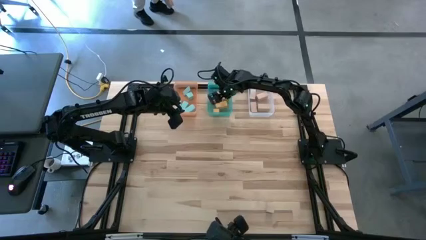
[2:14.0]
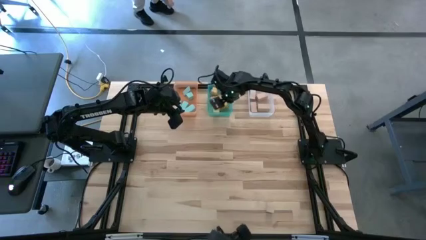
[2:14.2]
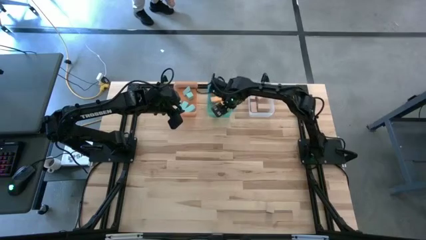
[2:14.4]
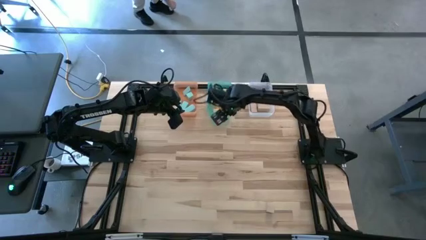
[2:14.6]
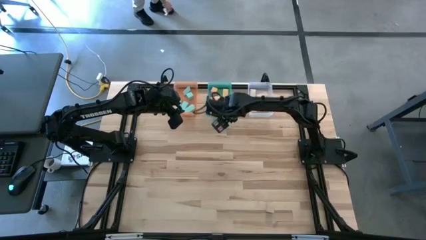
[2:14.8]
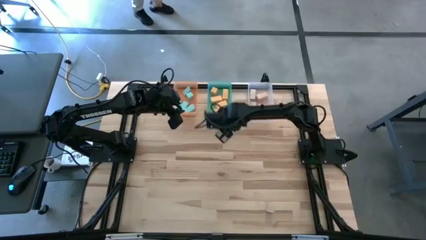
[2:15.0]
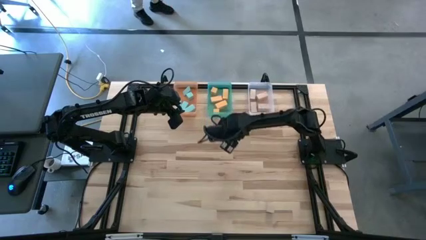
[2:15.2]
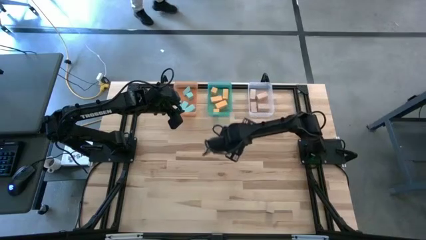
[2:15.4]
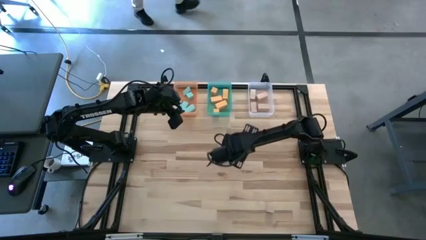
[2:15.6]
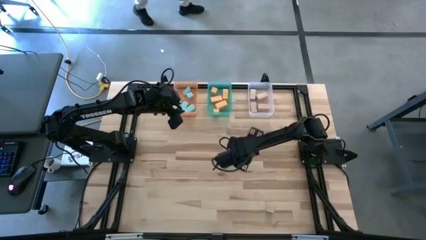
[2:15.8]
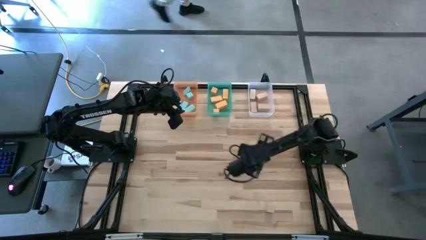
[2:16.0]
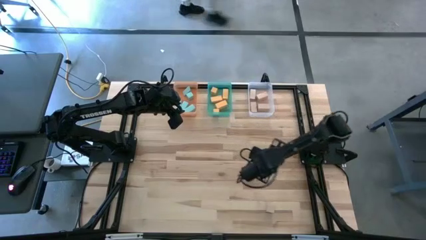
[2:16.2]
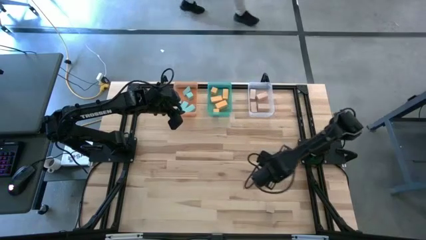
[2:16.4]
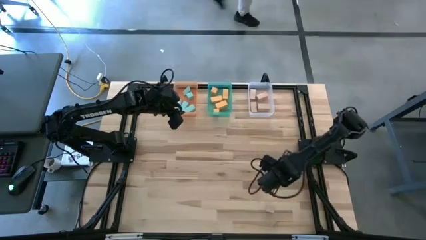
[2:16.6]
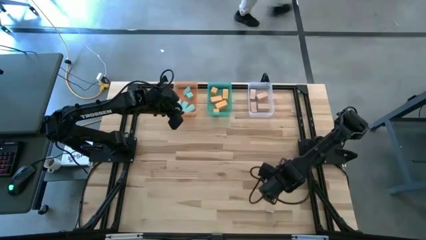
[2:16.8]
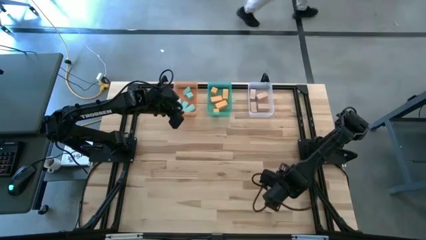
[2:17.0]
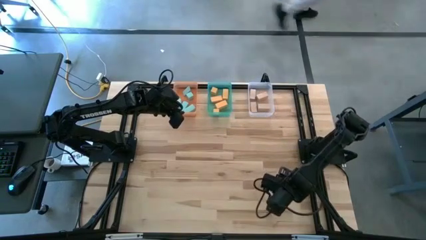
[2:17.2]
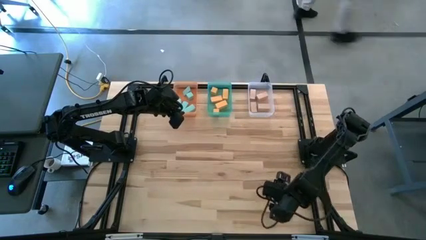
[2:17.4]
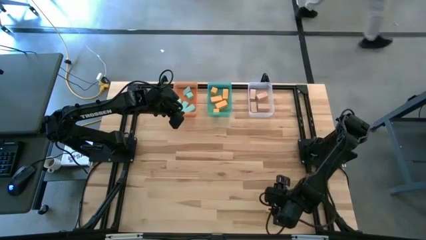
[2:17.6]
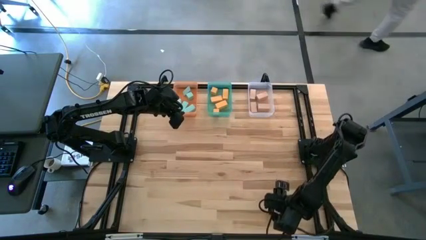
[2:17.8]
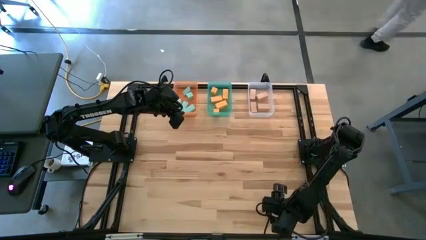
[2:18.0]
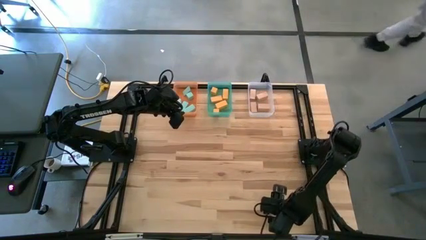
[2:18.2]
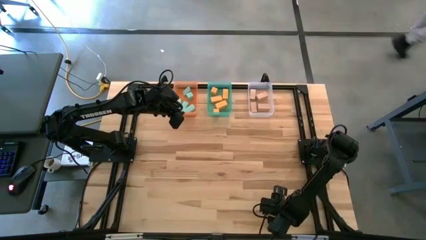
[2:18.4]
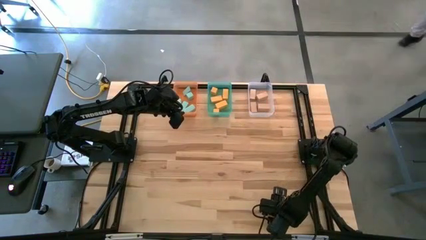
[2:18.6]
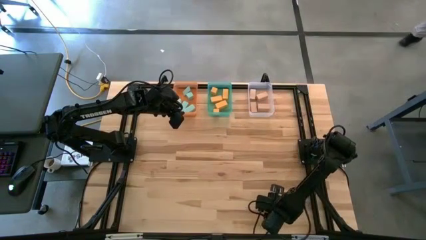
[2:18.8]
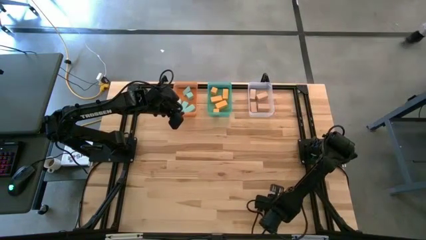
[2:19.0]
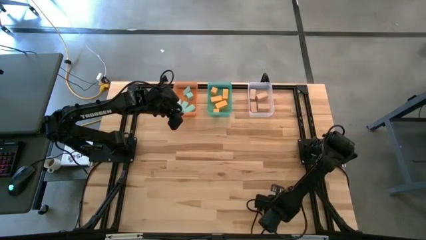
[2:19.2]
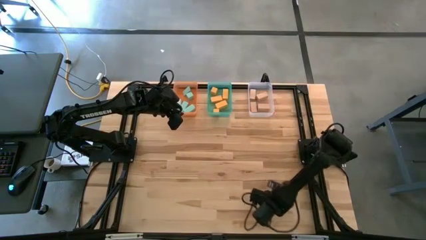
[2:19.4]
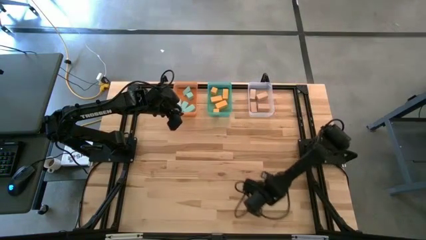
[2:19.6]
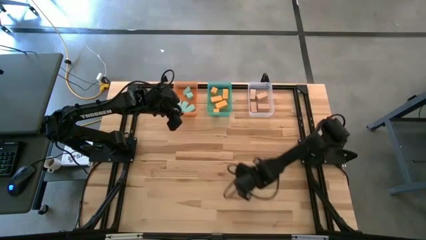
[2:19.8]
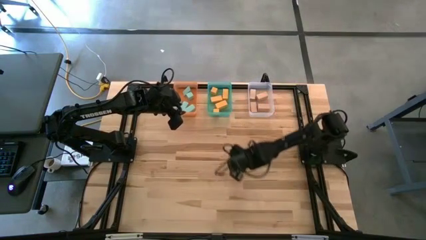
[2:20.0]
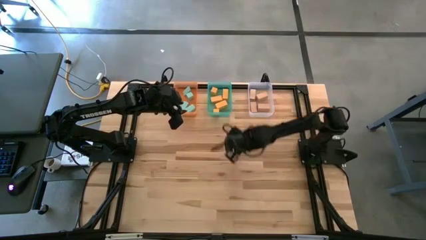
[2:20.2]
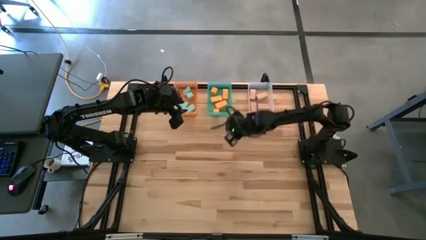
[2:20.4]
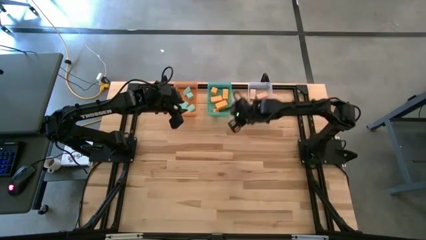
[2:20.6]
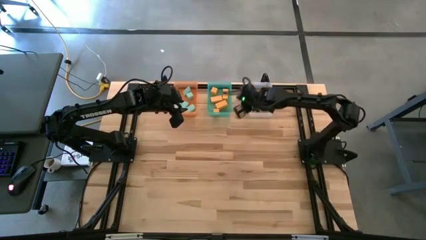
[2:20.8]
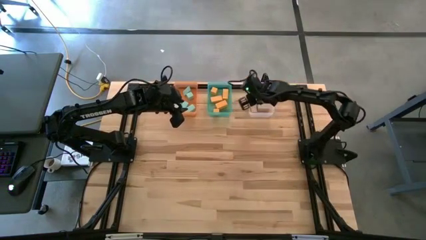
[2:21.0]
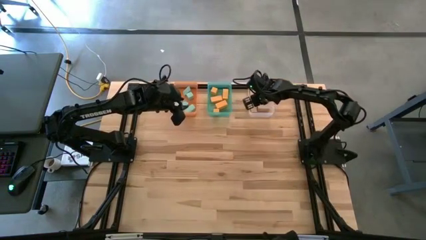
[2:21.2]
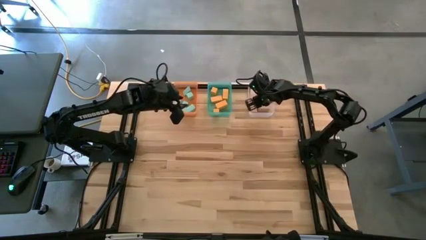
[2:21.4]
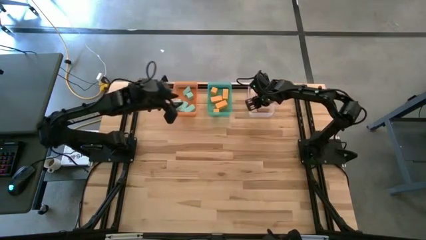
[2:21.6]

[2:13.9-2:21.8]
Task: Sort & place blocks by color
Put the brown block into the transparent bin

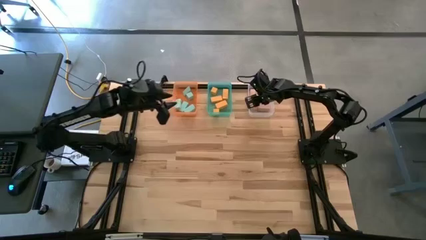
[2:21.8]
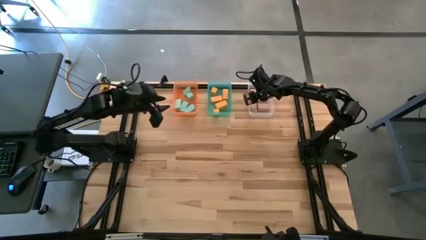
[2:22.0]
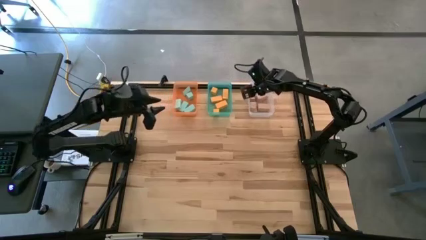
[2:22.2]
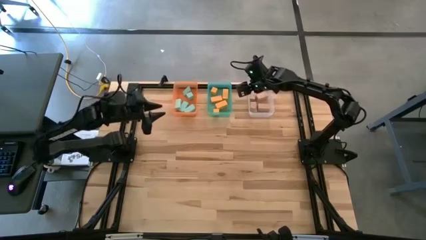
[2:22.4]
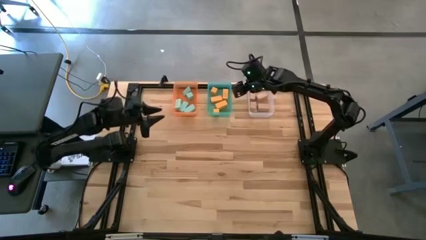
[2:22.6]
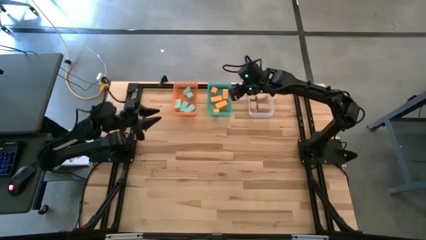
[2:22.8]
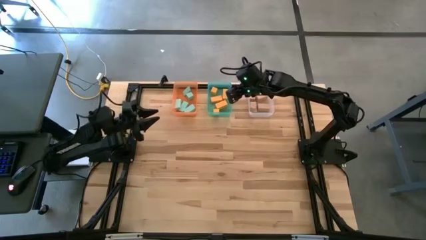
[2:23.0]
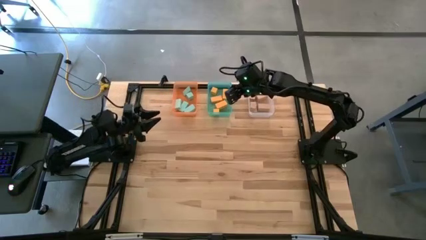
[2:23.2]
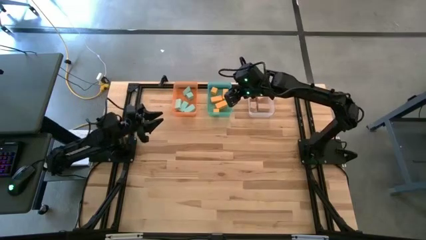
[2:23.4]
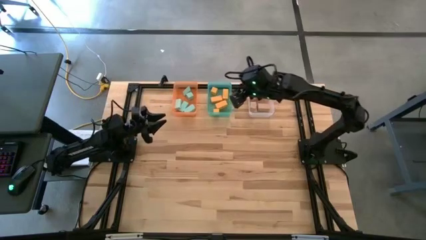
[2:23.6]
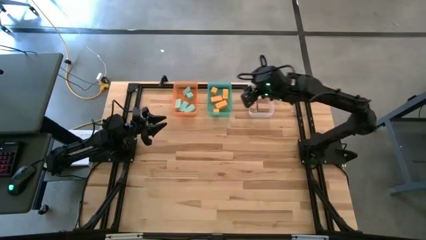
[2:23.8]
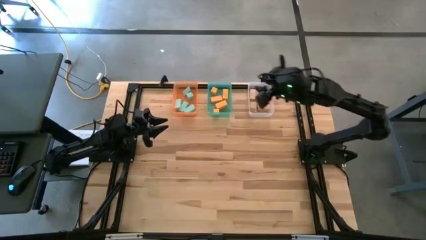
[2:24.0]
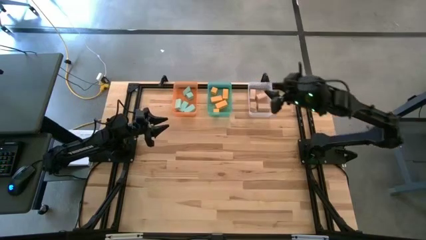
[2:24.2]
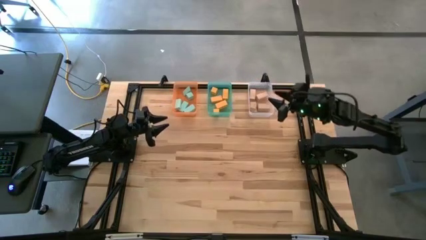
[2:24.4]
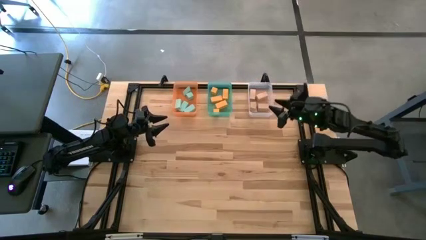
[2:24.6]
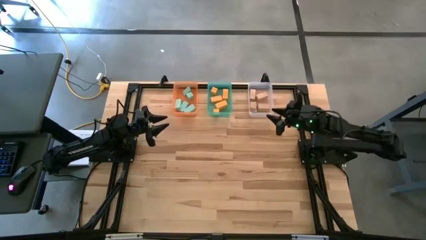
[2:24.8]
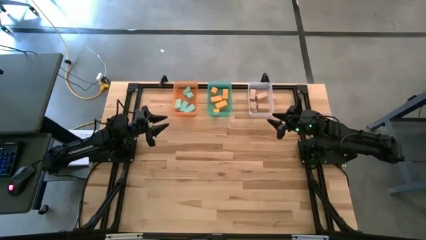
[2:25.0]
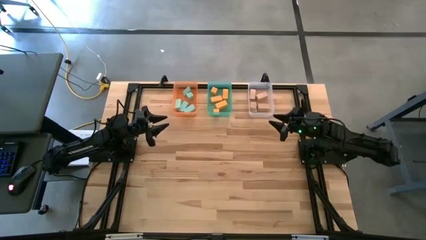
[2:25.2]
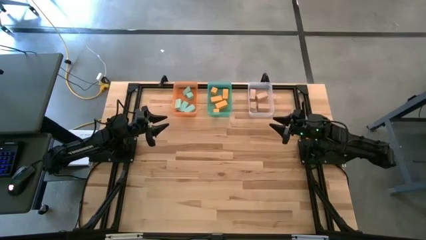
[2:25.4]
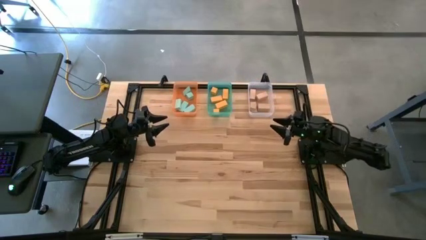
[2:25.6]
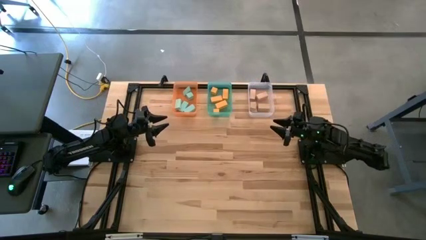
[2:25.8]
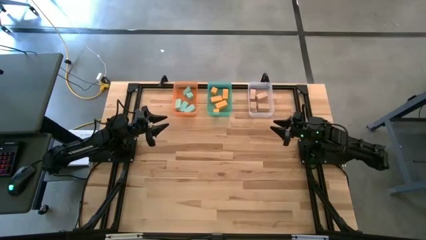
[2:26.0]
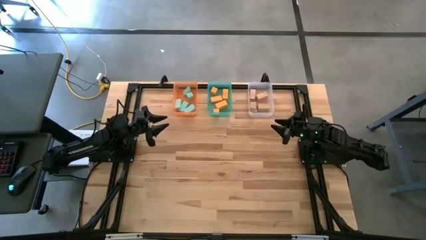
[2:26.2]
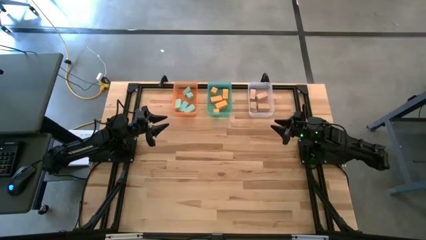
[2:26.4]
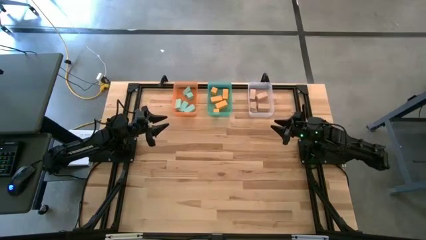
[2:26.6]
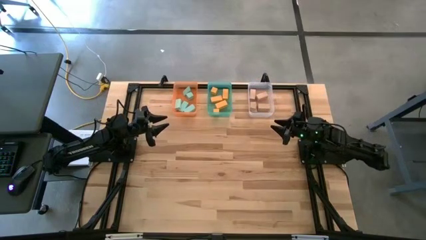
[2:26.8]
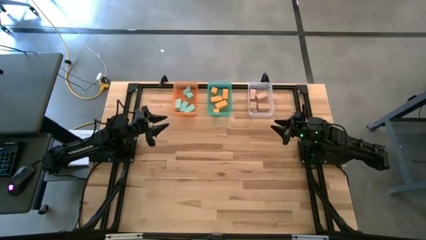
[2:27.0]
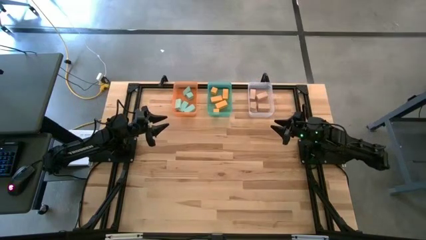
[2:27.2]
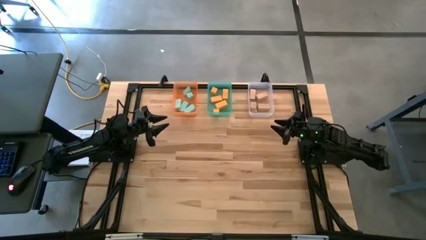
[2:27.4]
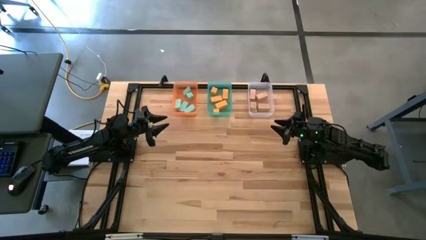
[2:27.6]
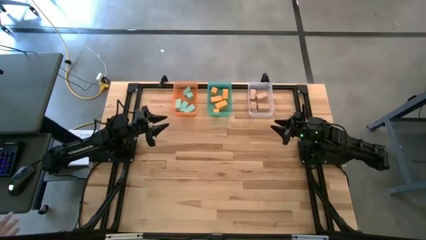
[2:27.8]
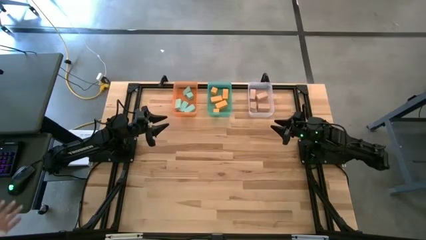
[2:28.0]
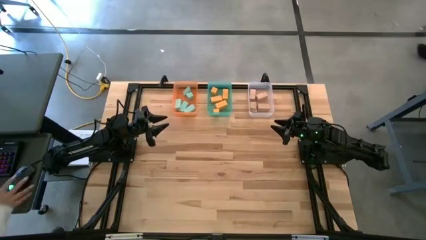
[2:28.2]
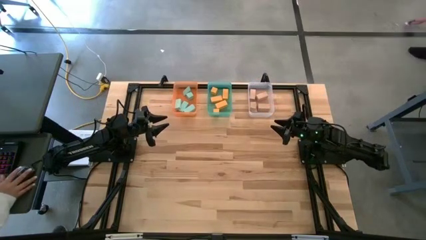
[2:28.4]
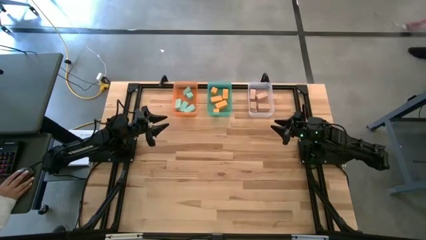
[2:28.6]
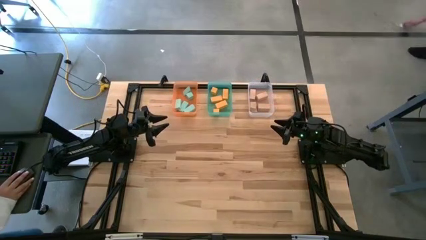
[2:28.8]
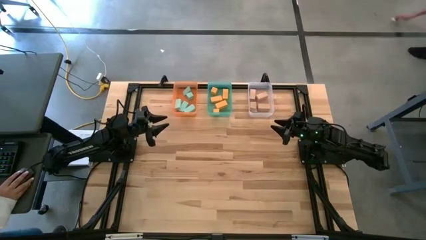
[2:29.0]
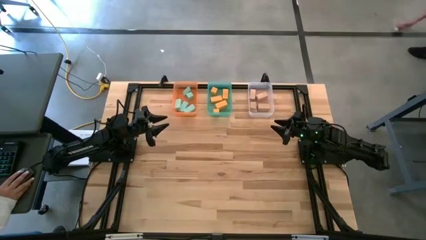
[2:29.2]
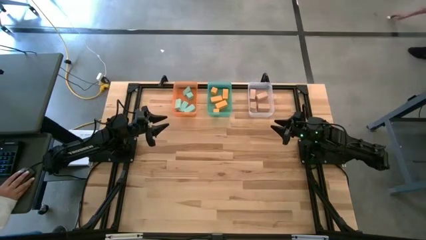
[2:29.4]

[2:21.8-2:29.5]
Return to Home Position
